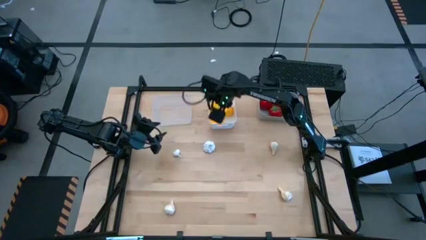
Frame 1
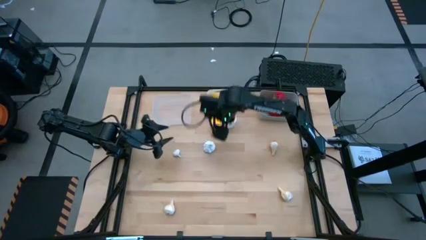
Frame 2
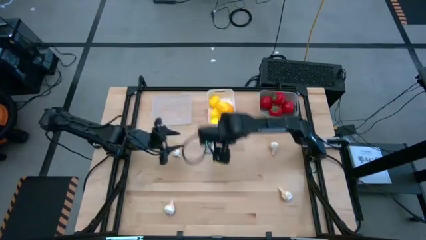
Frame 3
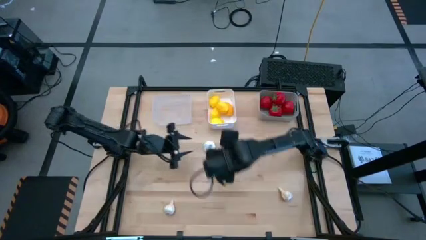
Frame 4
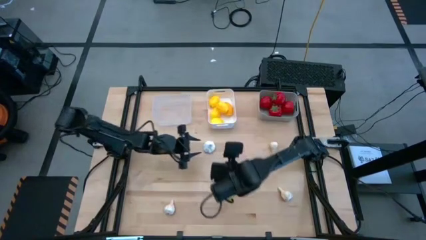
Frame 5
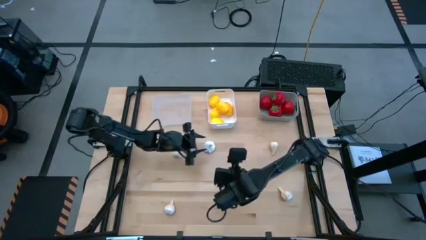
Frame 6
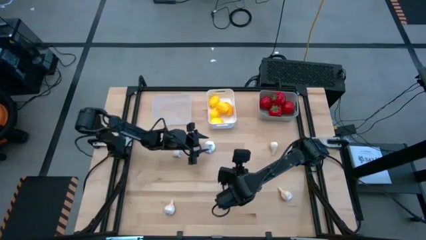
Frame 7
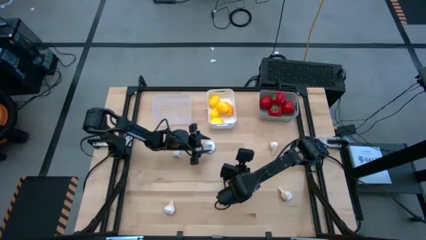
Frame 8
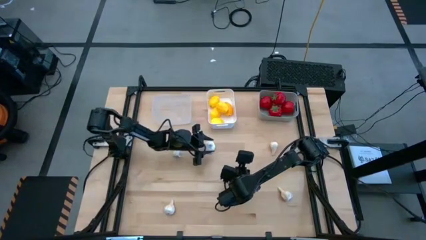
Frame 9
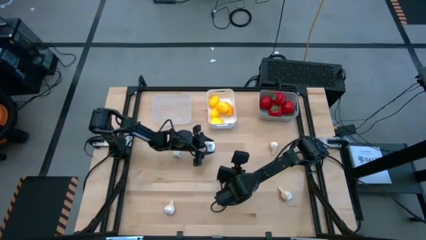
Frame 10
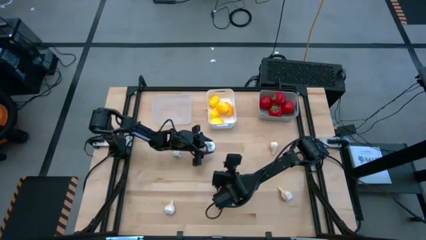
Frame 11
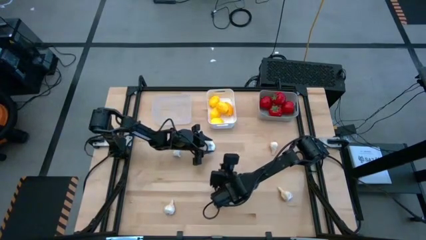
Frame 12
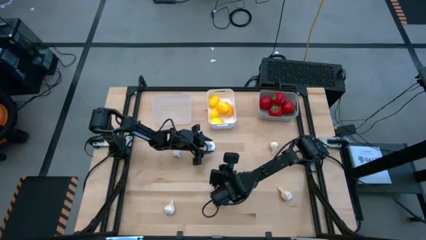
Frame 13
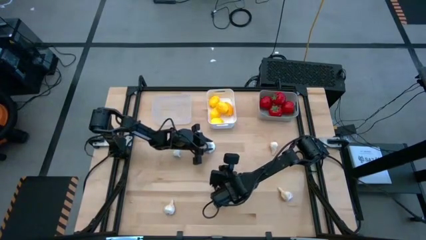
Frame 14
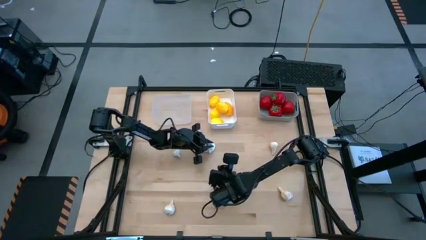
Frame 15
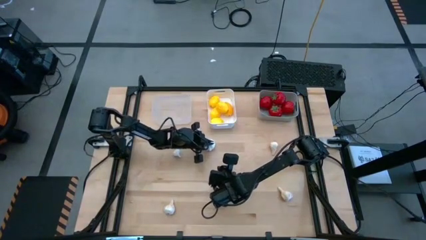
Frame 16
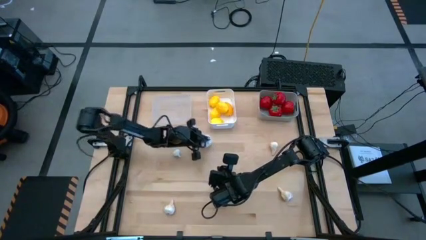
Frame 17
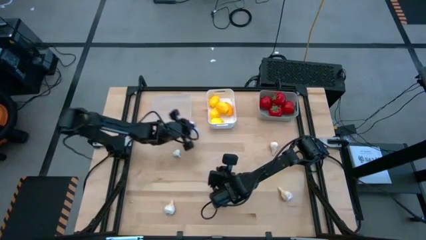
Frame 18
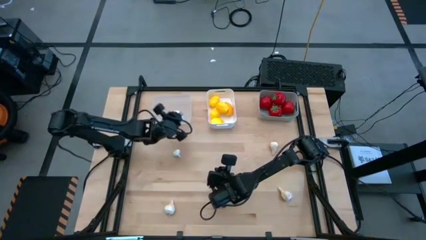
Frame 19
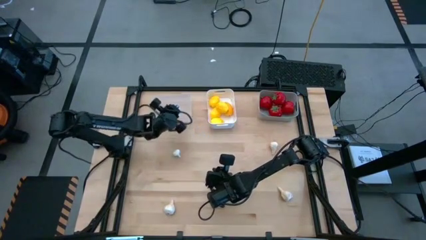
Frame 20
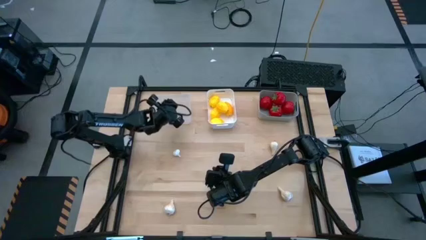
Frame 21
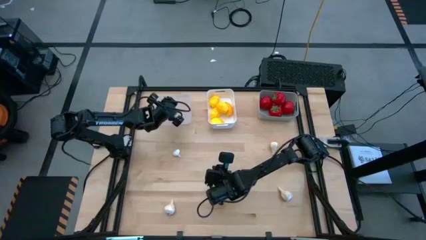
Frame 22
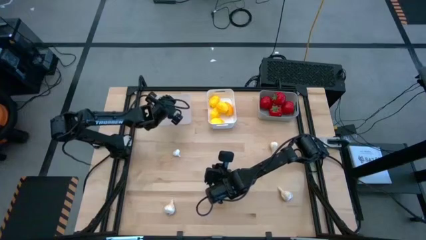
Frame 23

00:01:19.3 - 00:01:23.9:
Task: Sort produce into baskets
Put the garlic into the transparent bin

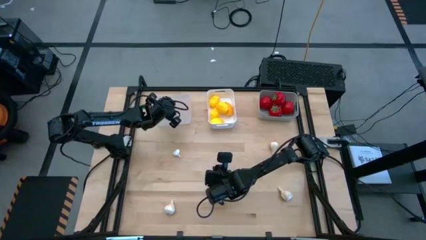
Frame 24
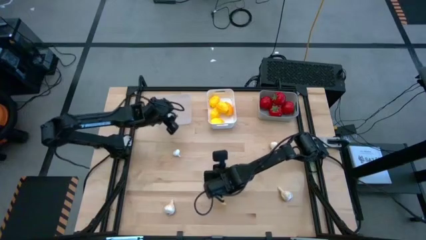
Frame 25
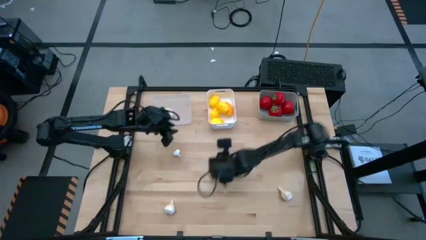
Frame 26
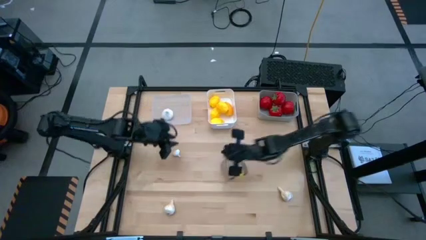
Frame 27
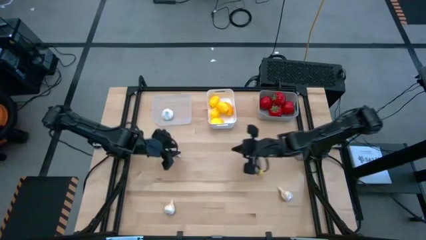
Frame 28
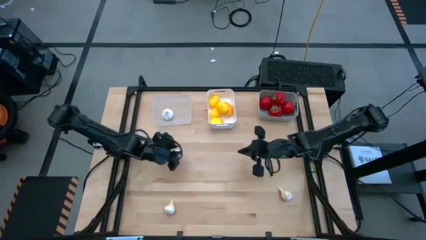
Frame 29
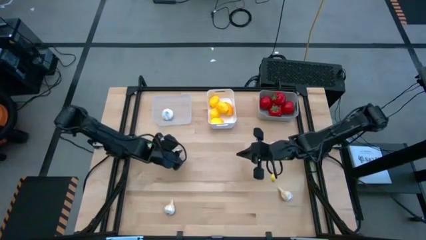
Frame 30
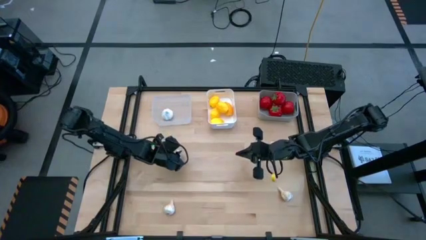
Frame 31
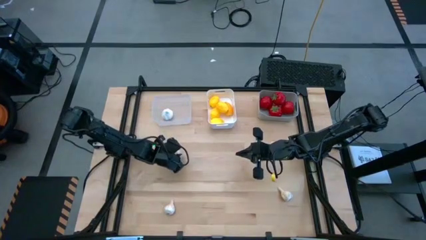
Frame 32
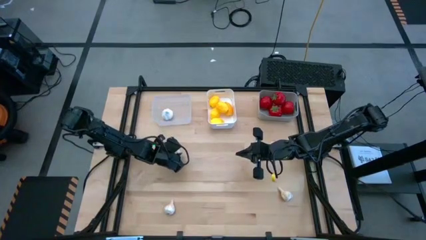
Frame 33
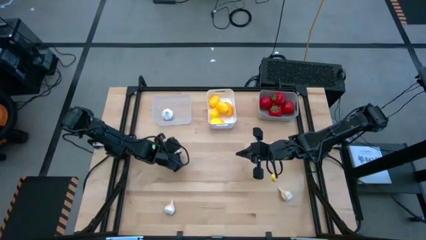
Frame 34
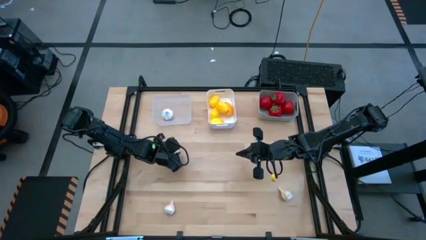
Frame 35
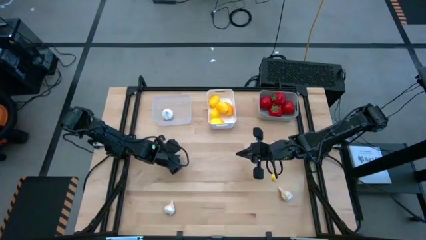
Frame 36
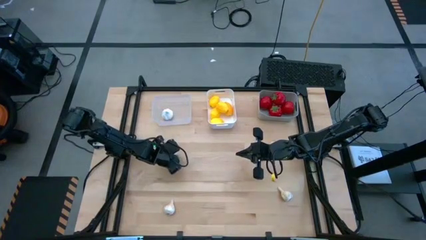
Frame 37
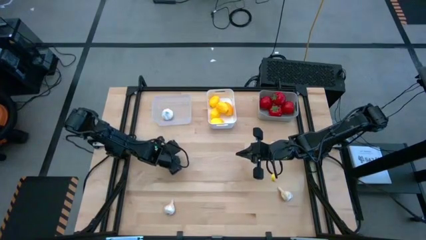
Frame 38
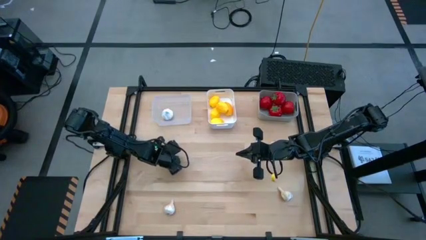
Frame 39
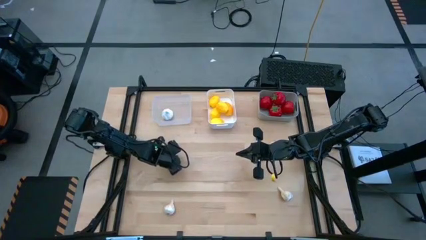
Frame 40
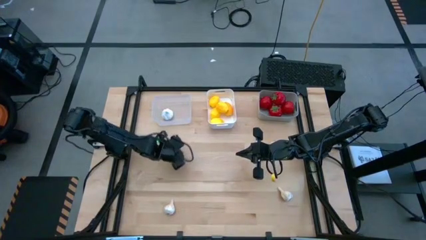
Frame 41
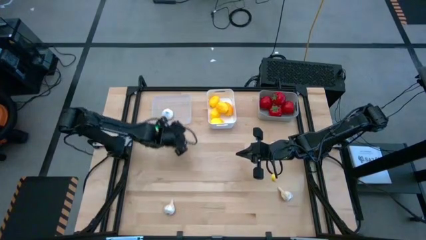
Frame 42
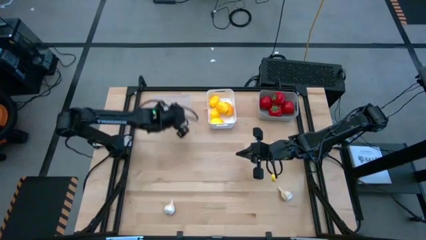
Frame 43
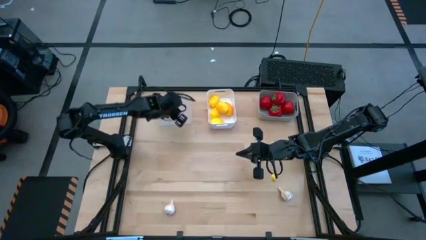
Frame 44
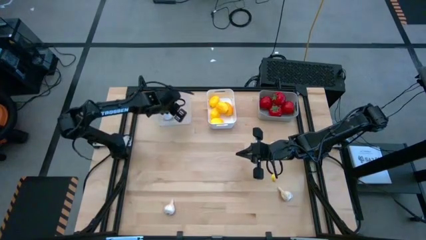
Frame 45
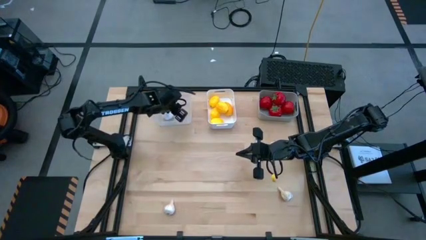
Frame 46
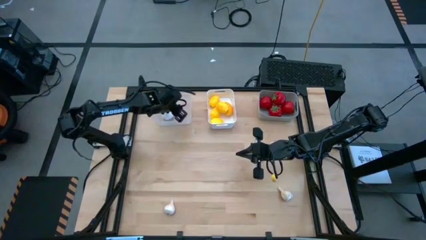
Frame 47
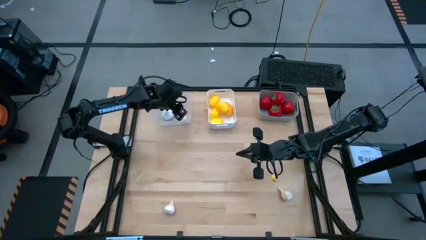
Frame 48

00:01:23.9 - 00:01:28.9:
Put the white garlic into the transparent bin

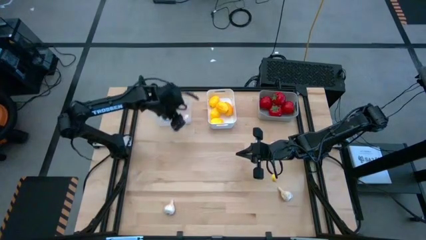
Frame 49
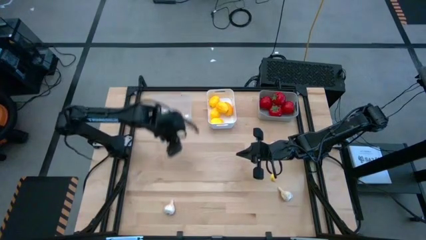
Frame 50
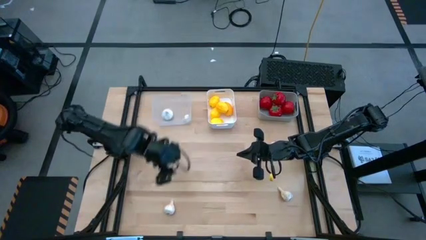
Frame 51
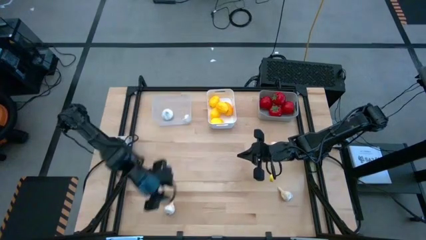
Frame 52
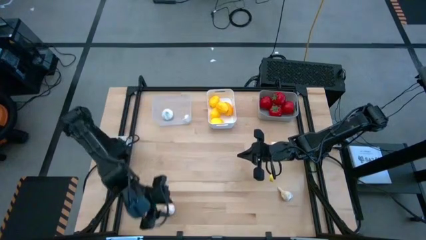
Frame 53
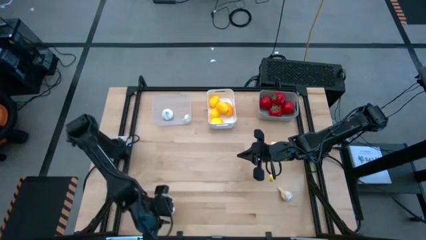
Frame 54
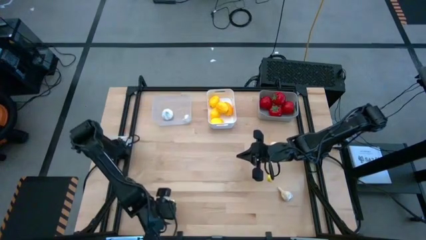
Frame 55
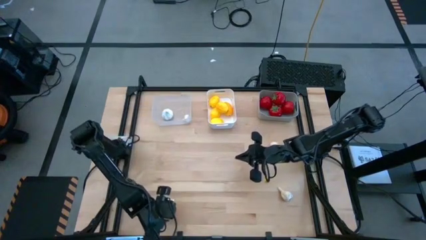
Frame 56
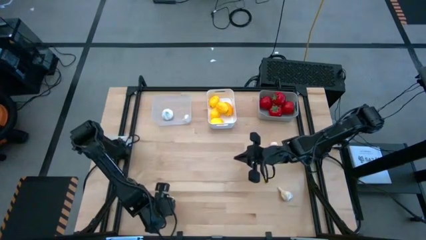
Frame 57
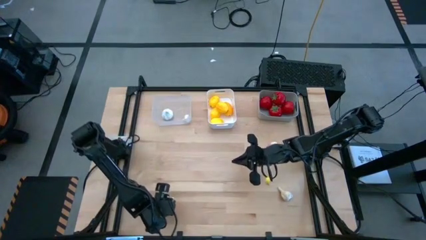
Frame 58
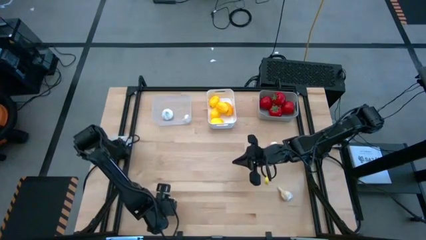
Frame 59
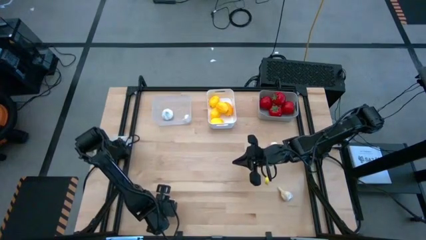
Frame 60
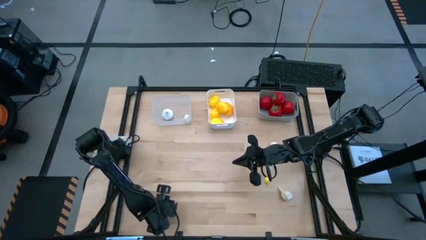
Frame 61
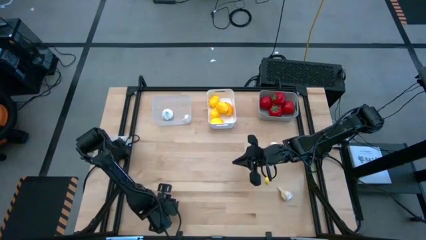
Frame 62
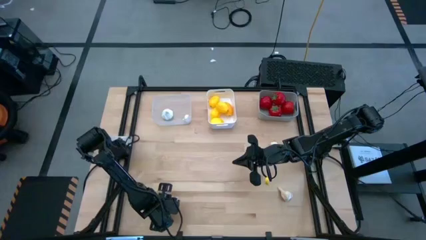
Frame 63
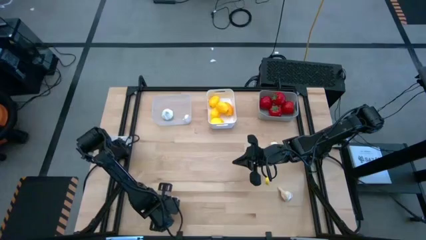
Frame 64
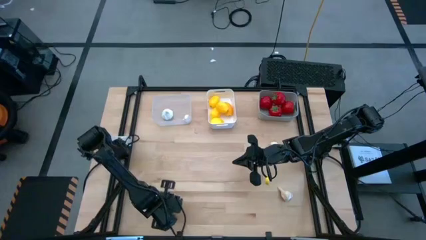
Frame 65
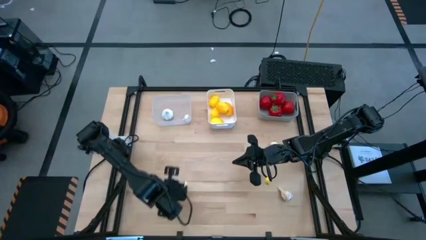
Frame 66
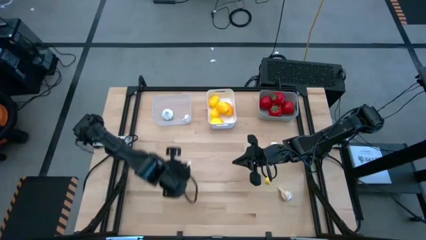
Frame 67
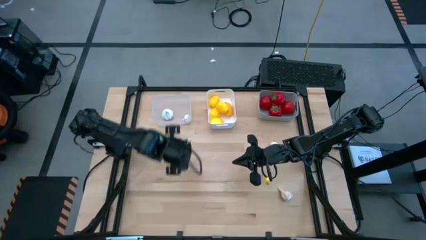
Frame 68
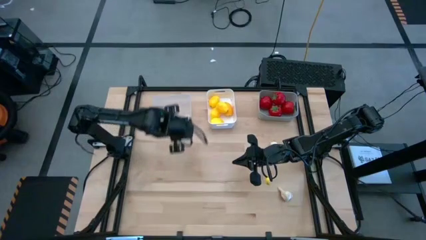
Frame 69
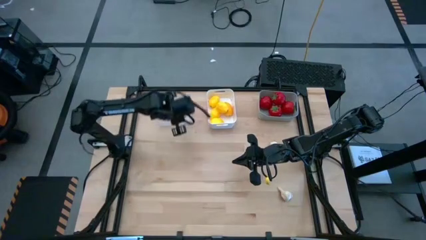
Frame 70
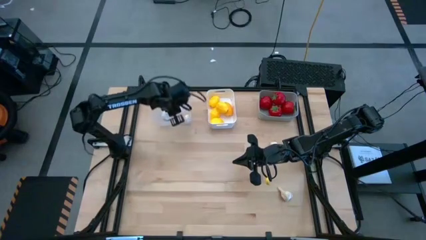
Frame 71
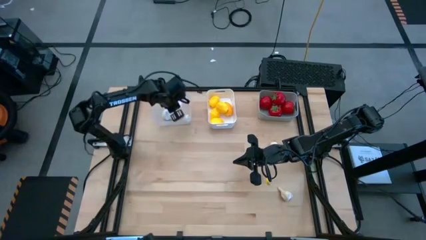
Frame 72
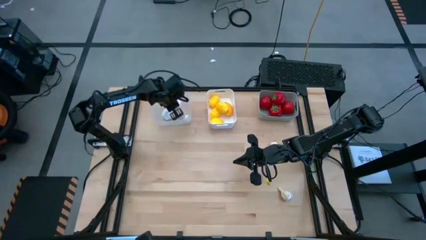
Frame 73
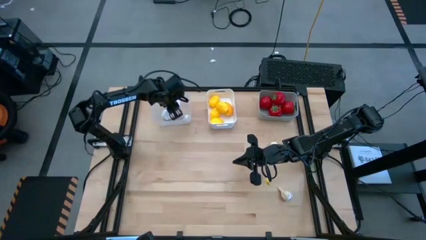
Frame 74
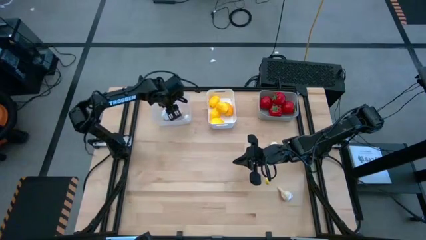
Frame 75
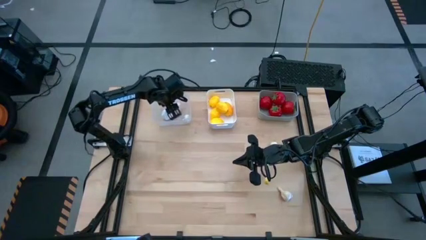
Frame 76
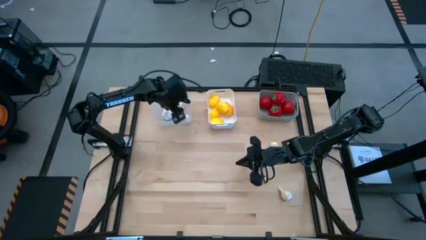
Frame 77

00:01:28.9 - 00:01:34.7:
Put the white garlic into the transparent bin

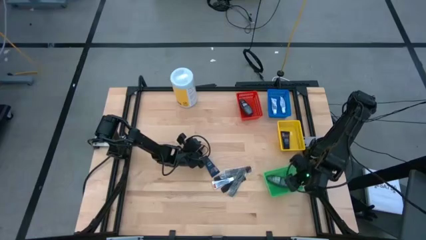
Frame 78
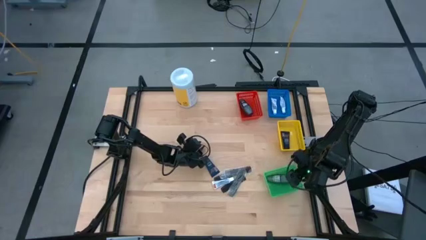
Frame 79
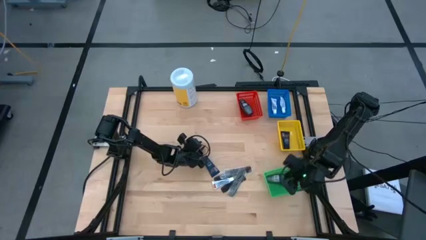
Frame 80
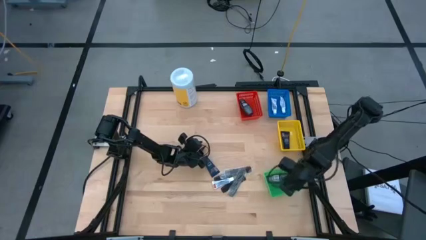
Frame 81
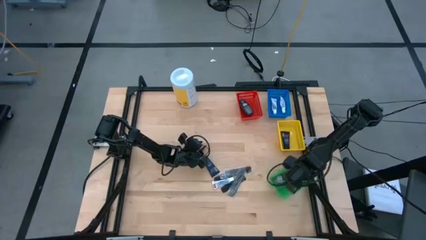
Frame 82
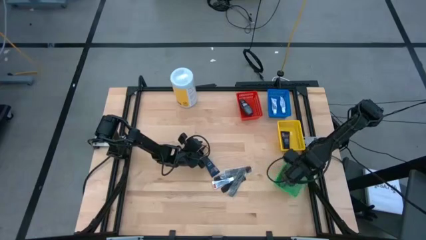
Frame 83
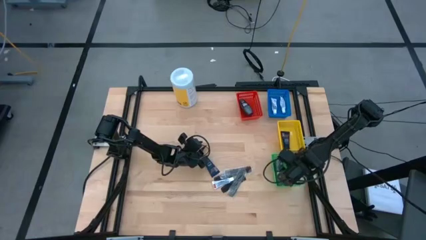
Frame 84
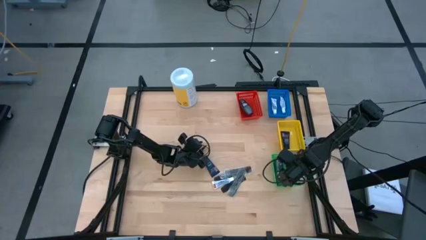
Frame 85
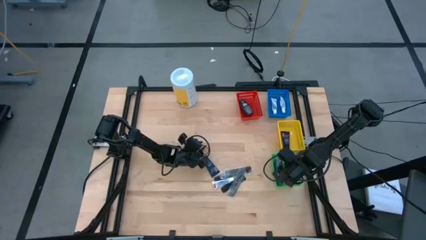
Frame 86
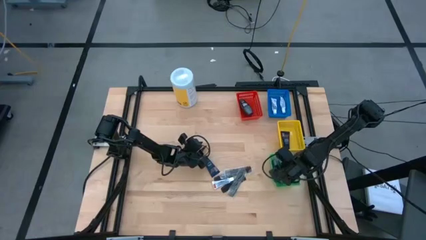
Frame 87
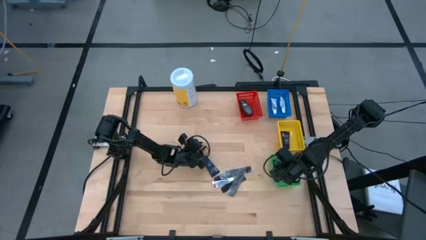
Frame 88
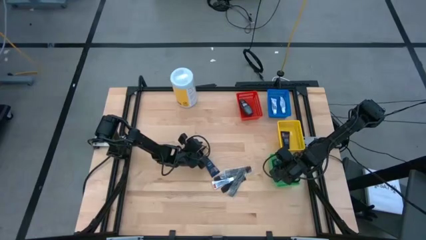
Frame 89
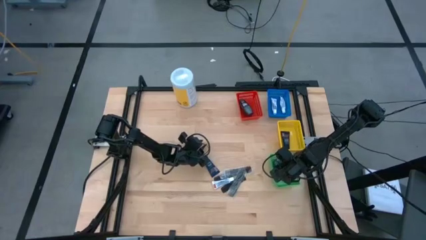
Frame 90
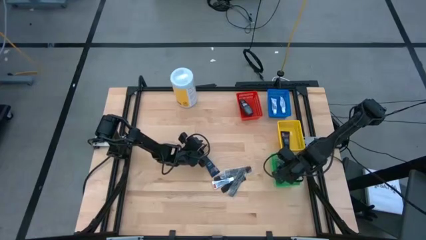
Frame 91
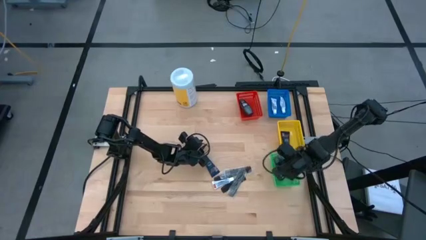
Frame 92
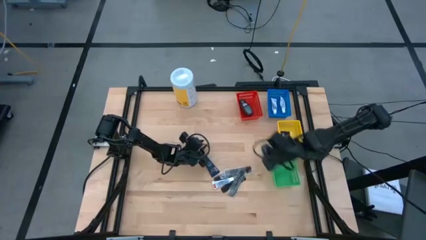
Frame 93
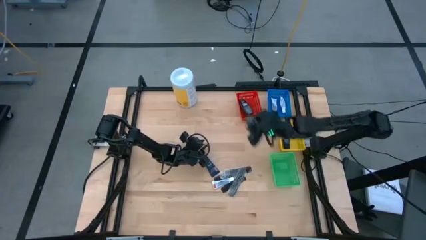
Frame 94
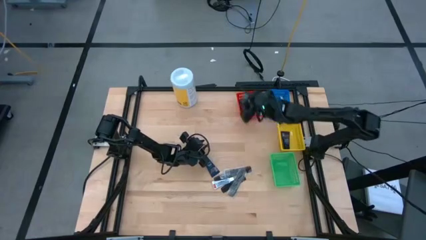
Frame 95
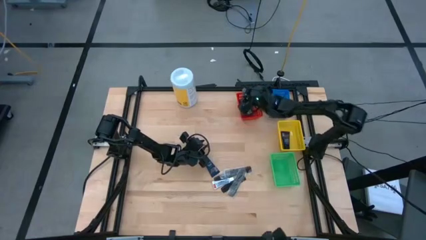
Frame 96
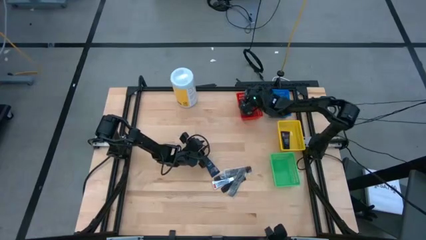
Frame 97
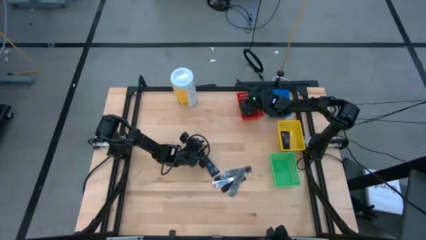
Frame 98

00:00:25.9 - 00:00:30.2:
Task: Pick & Place Travel size toiletries
Put the gray deodorant into the red bin
